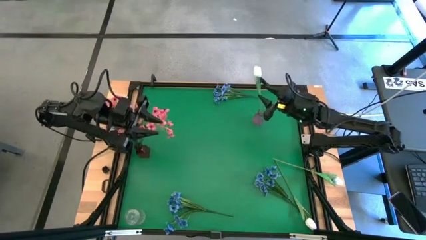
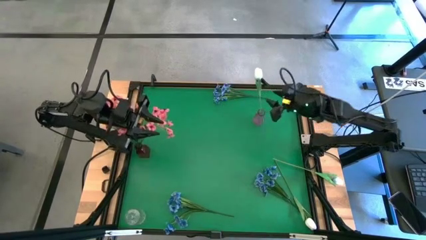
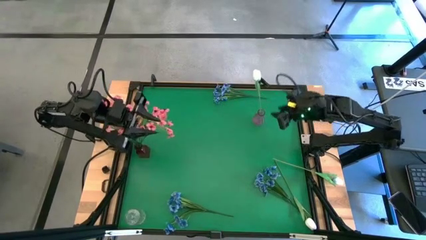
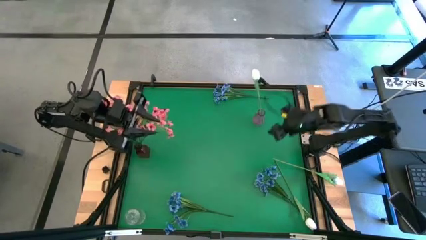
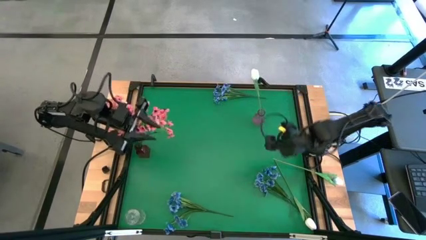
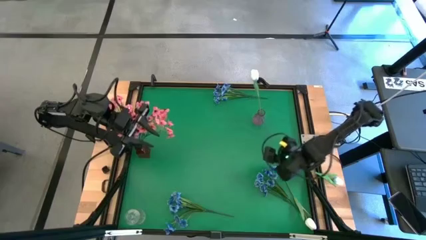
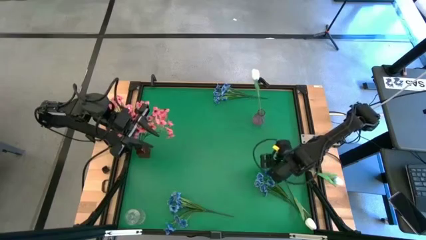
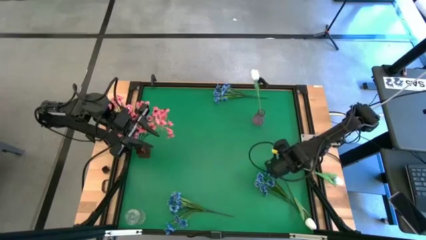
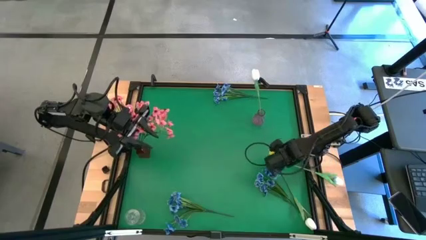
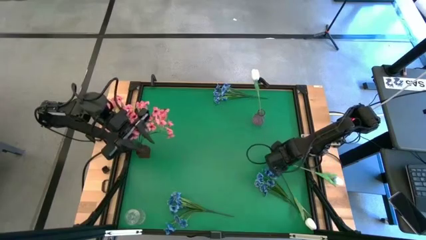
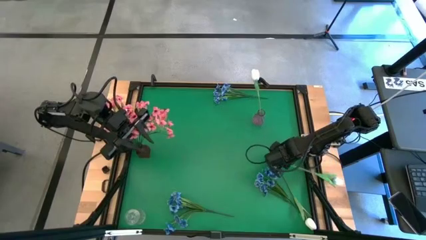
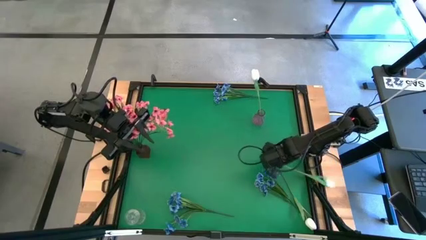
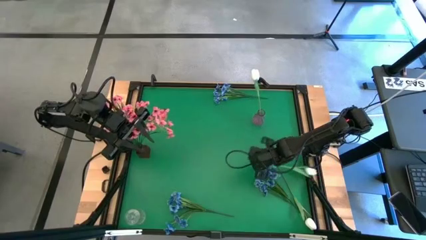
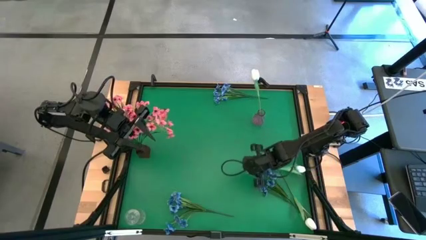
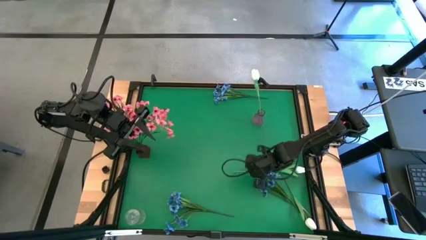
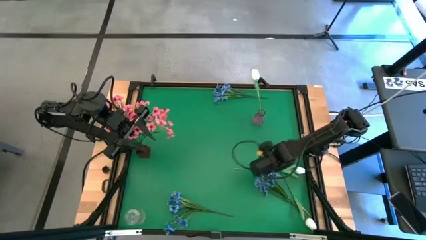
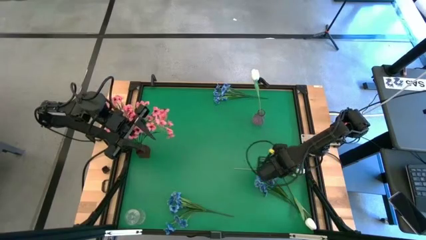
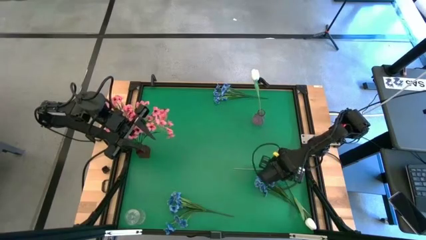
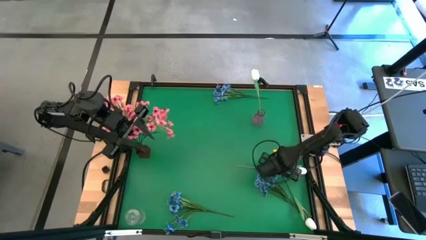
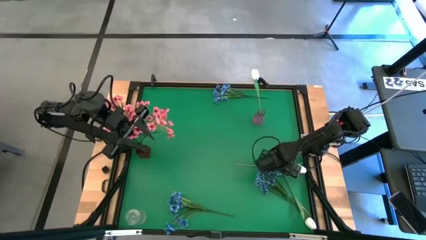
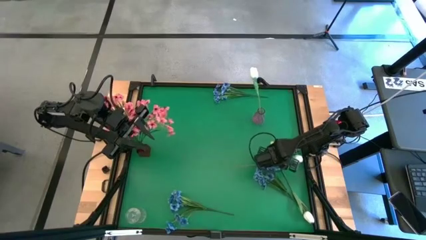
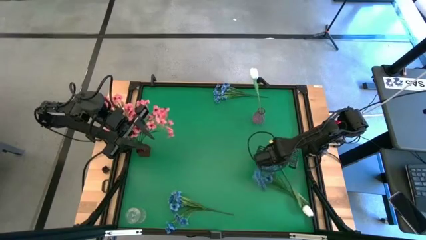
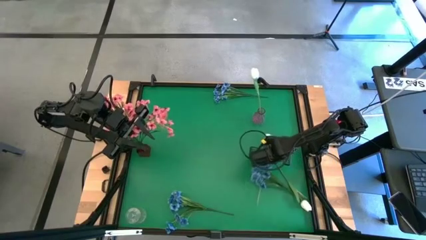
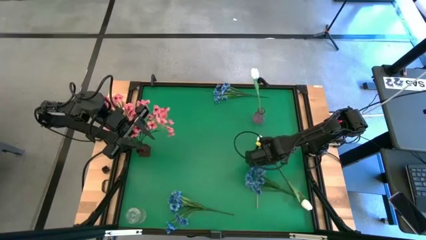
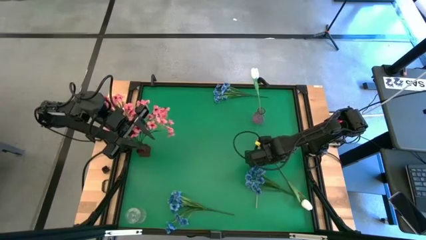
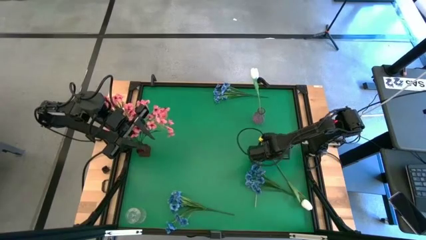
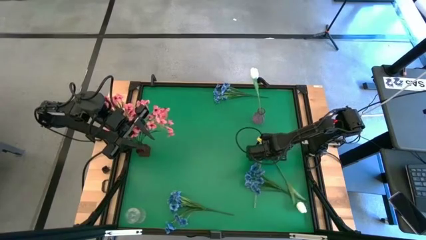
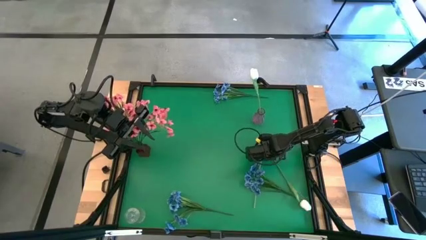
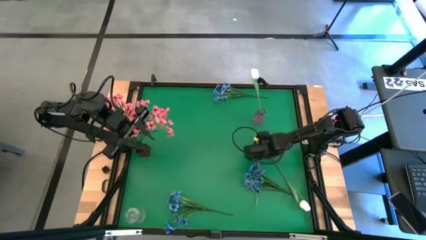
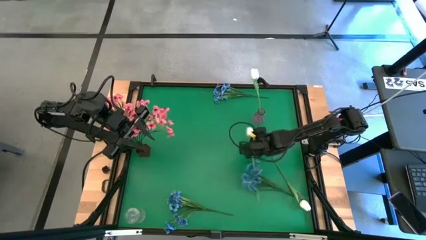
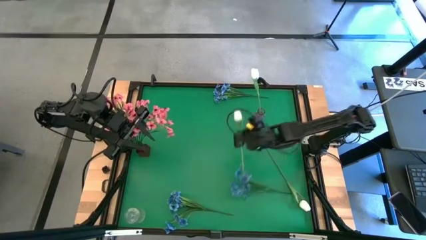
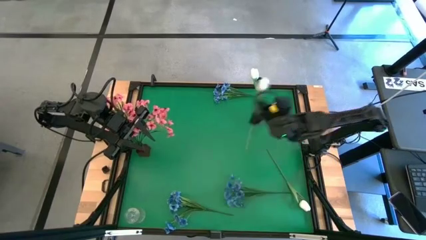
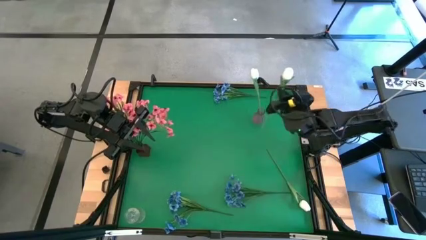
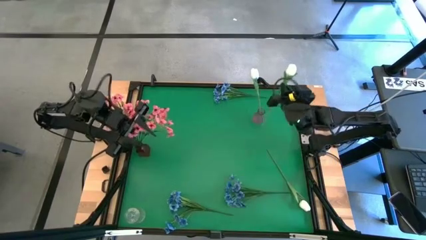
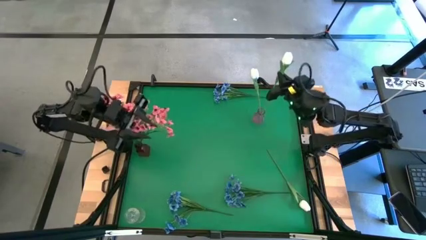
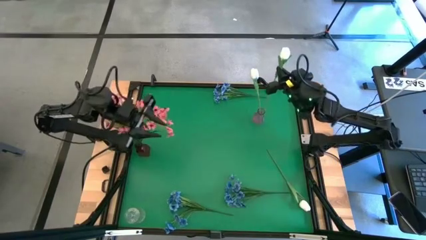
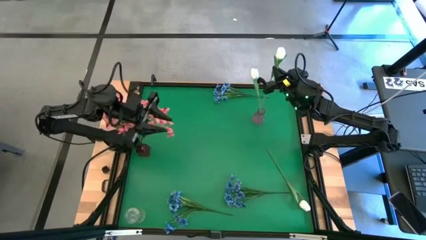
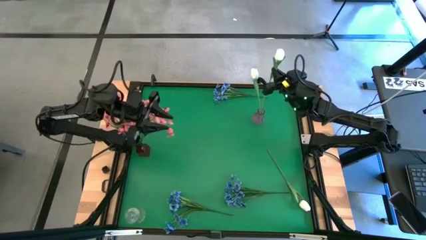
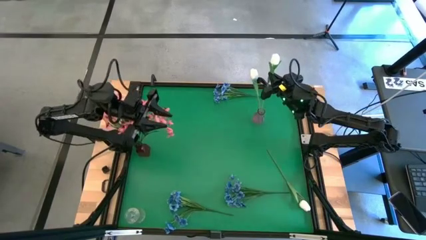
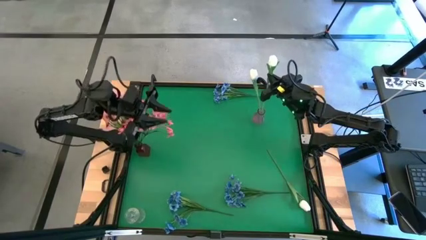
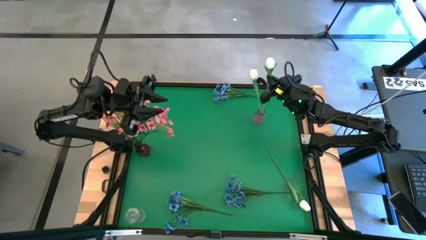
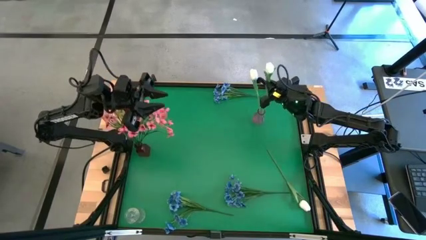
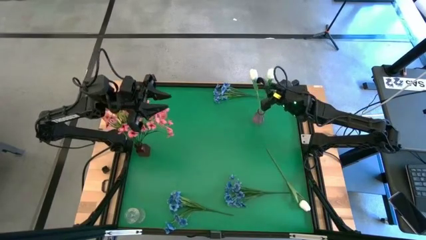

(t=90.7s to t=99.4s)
Task: Sort flowers into vase by color
Put the top white flower into the violet vase

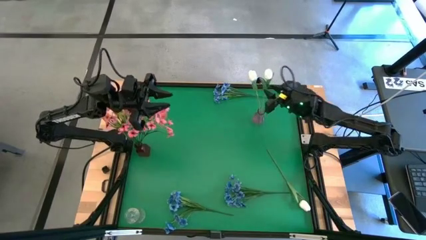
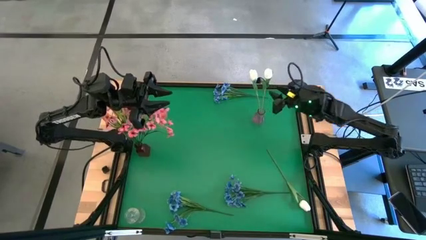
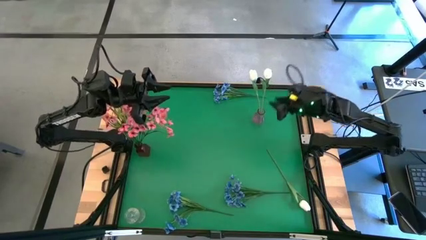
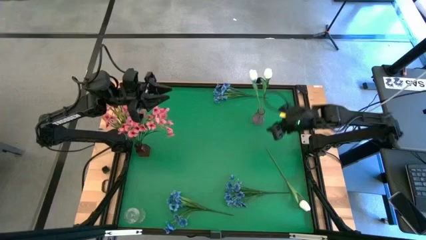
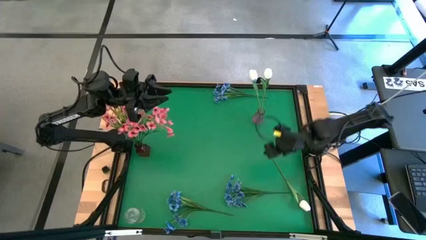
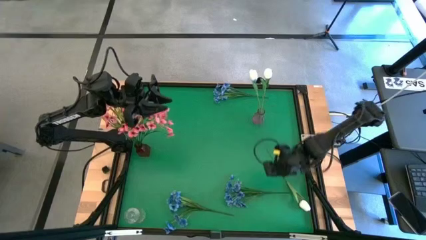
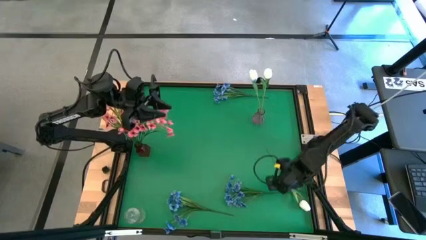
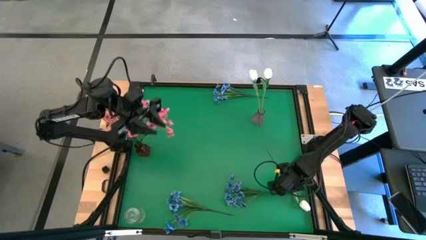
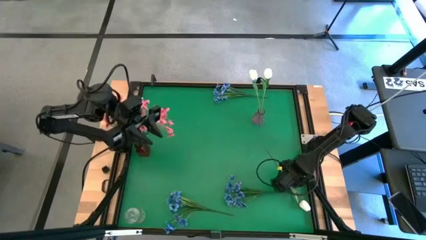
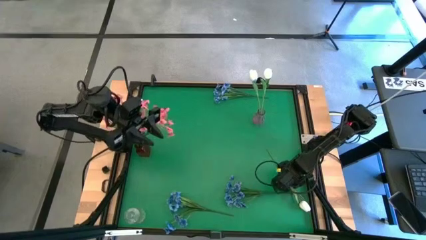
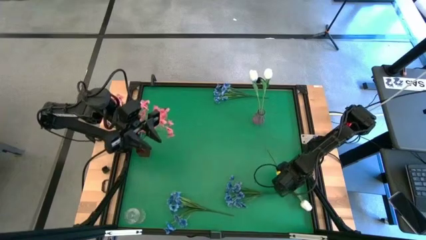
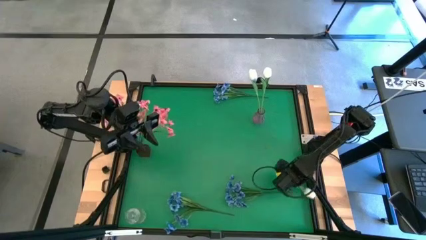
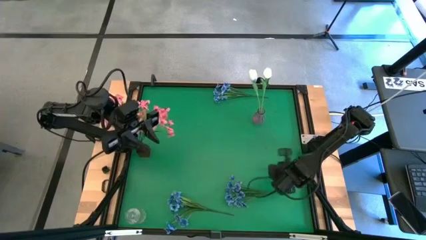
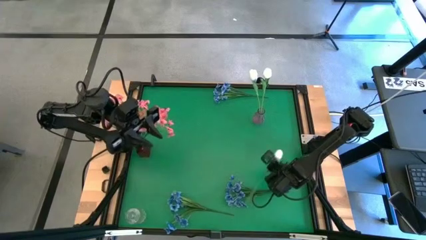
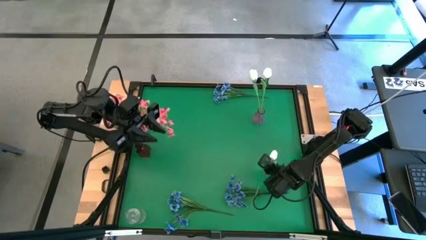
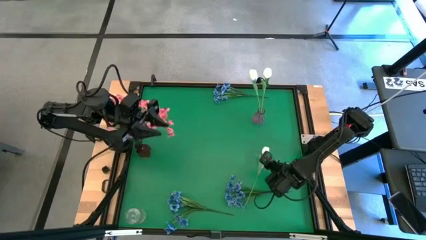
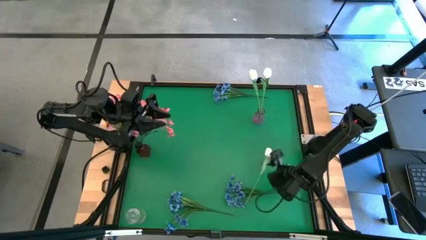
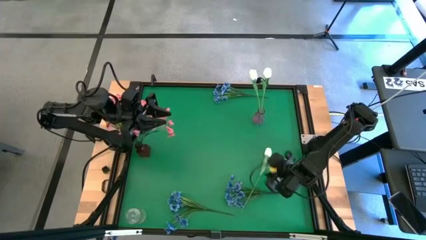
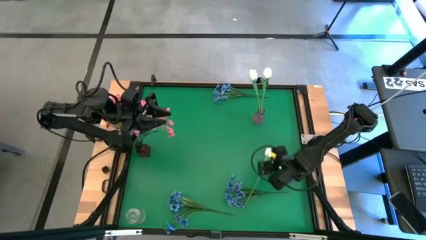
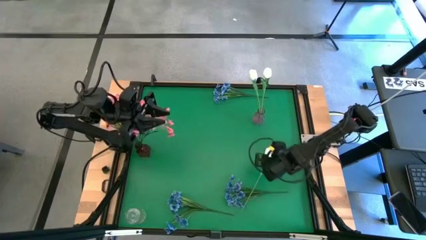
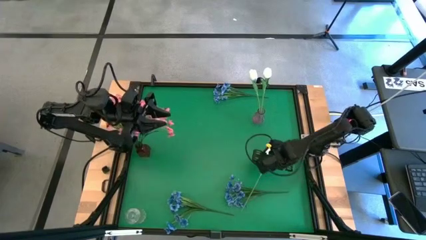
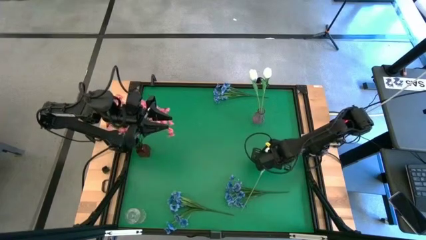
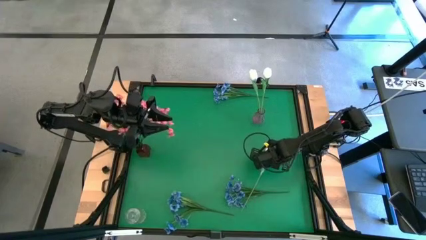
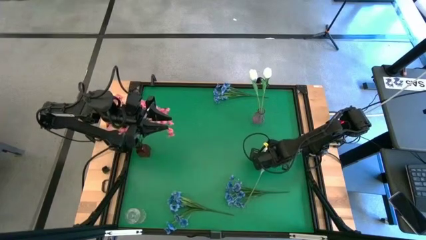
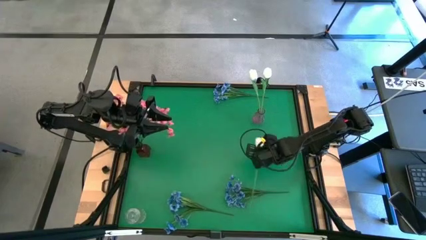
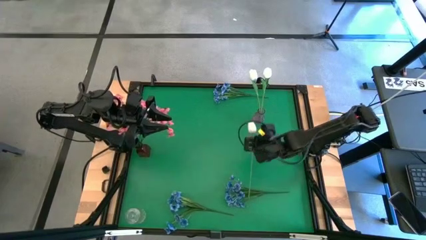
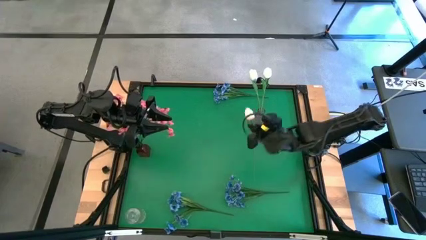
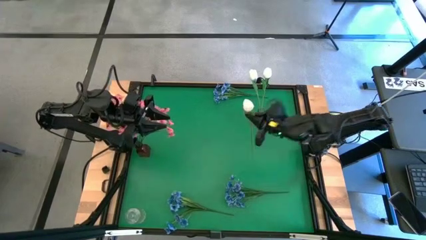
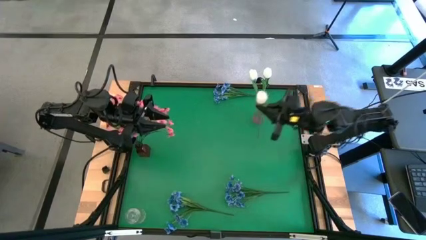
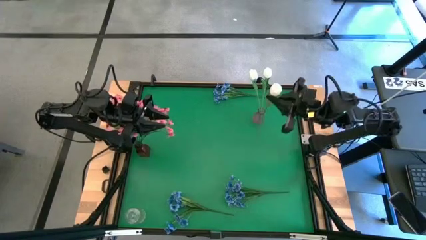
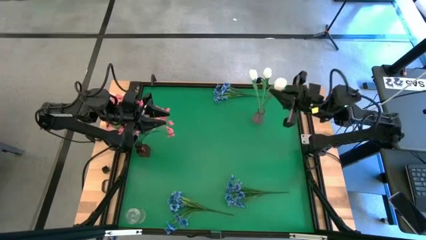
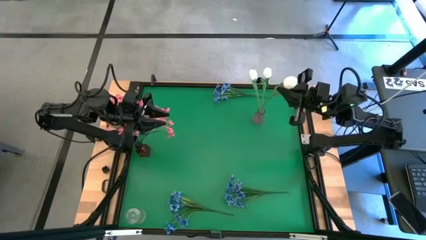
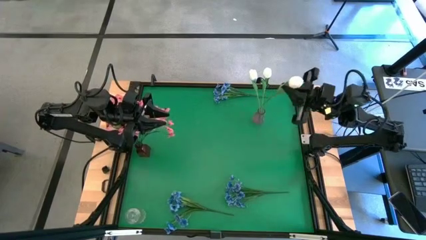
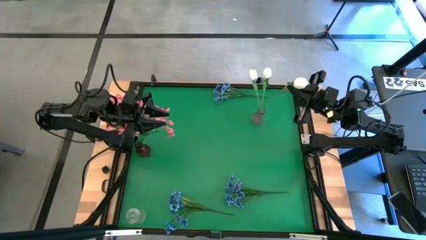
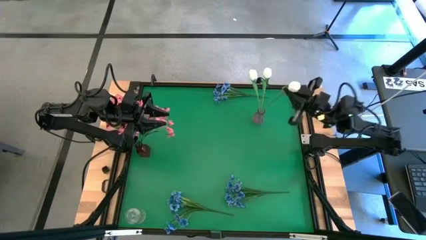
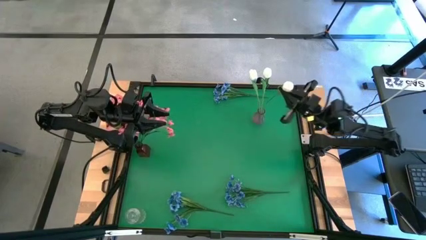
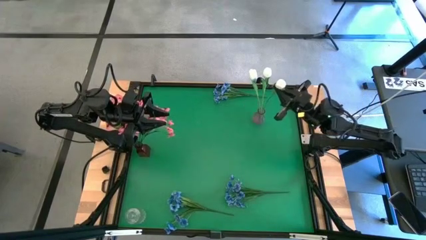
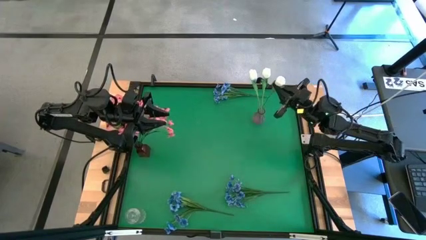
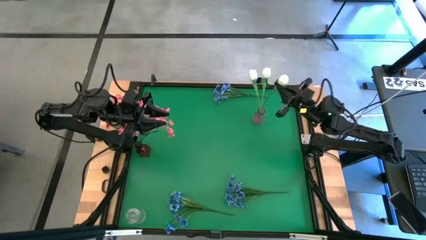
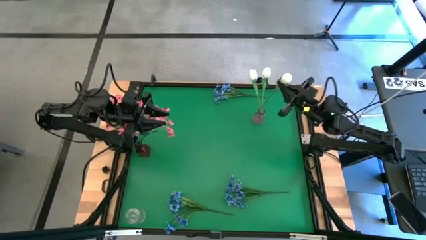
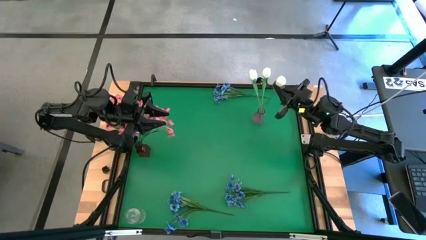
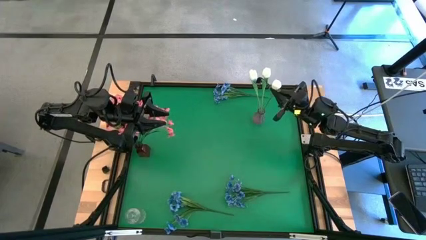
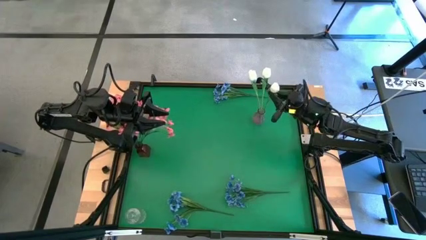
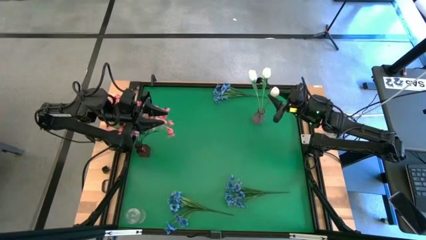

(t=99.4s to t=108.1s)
Put the white flower into the violet vase
